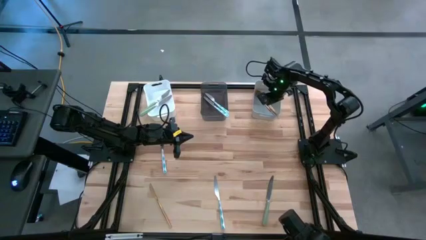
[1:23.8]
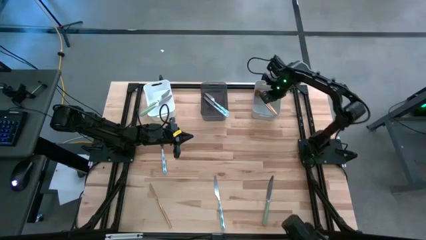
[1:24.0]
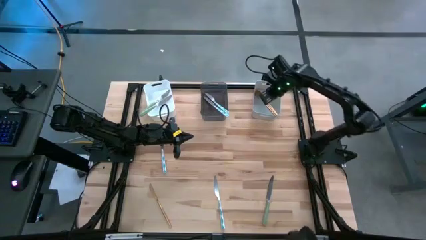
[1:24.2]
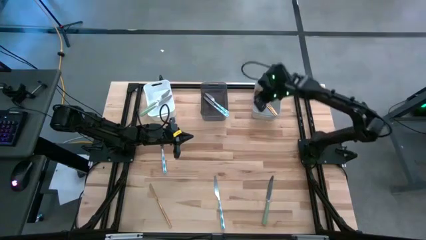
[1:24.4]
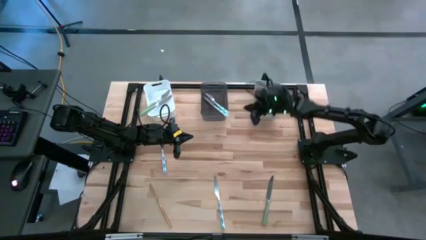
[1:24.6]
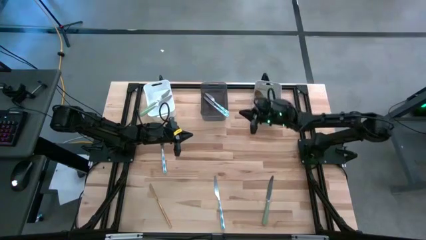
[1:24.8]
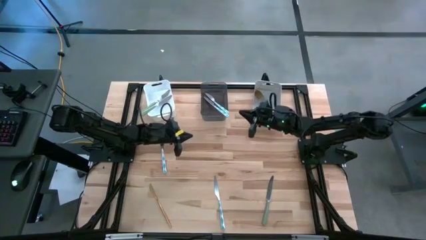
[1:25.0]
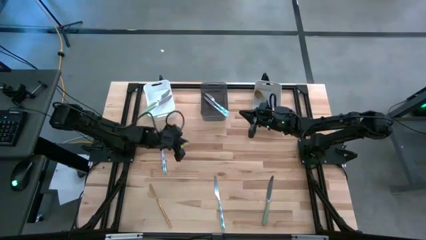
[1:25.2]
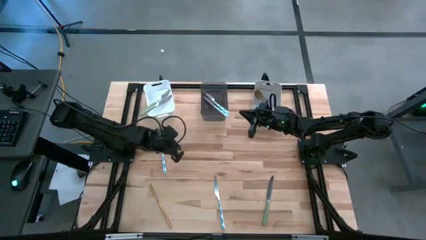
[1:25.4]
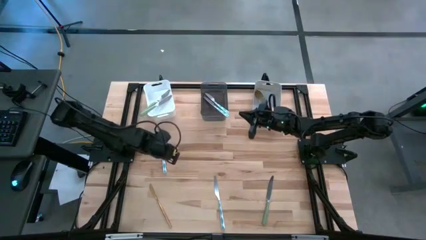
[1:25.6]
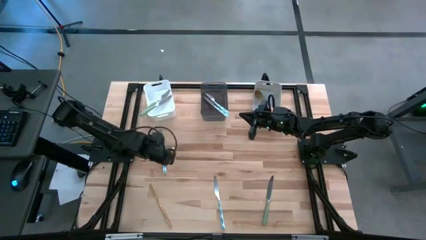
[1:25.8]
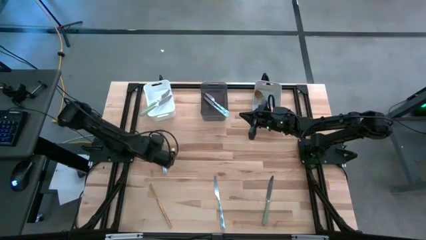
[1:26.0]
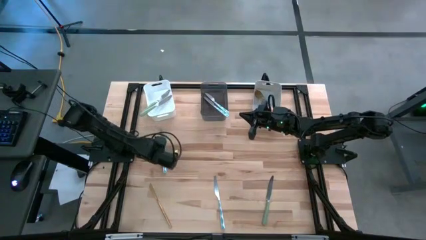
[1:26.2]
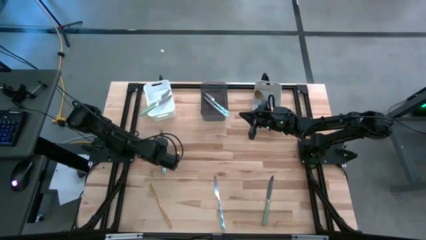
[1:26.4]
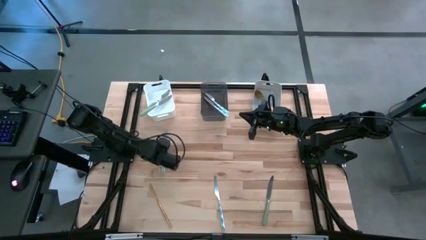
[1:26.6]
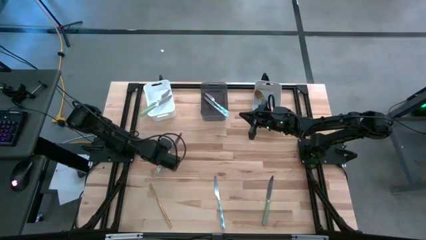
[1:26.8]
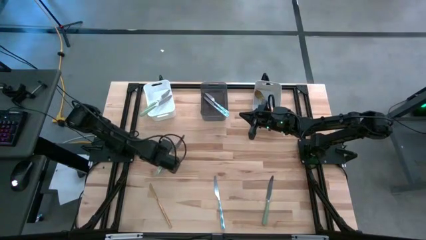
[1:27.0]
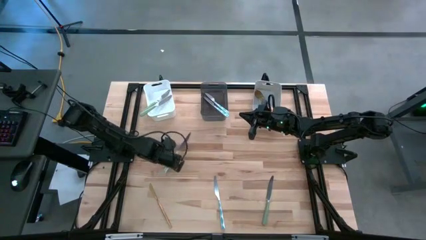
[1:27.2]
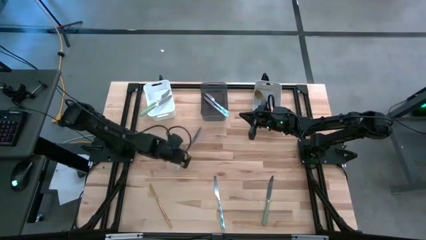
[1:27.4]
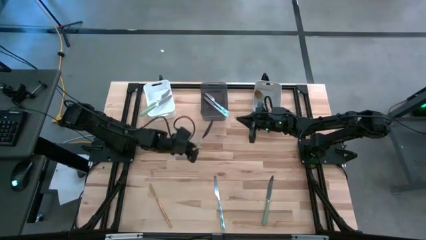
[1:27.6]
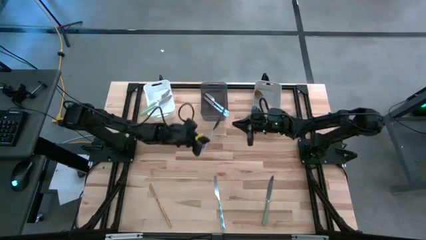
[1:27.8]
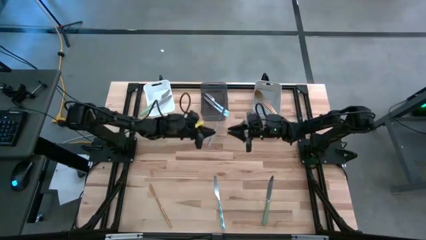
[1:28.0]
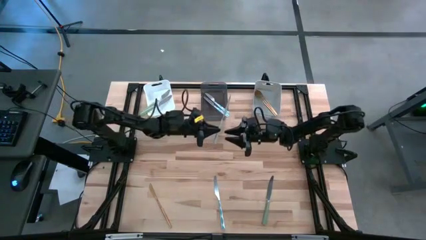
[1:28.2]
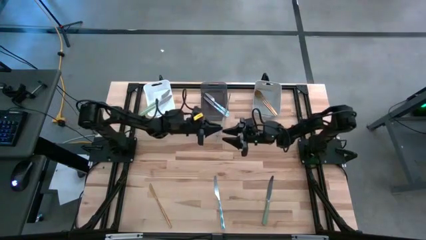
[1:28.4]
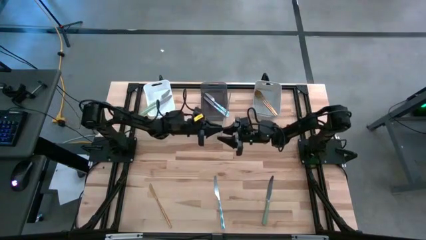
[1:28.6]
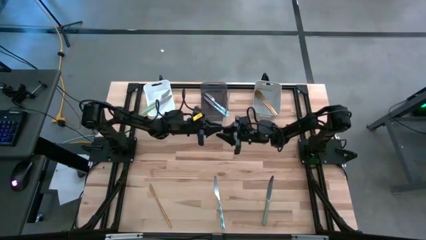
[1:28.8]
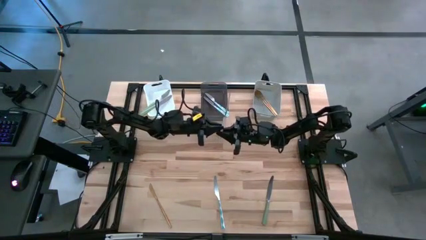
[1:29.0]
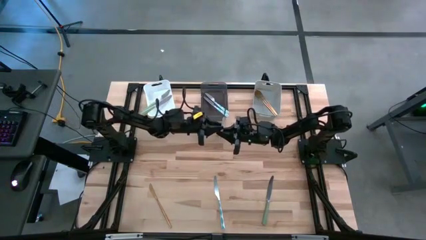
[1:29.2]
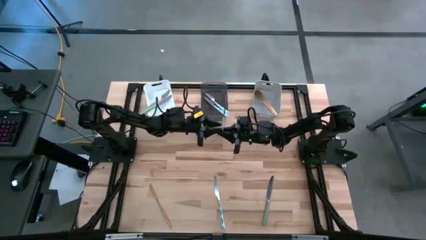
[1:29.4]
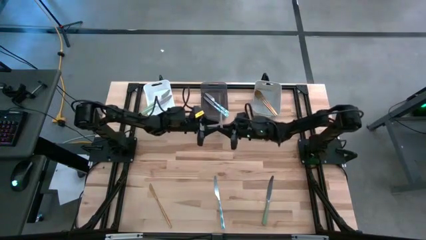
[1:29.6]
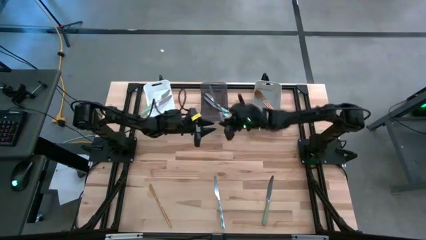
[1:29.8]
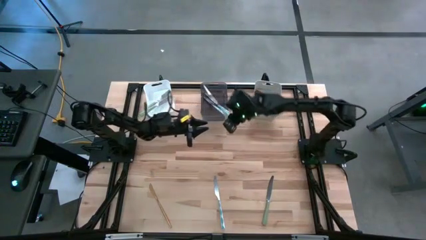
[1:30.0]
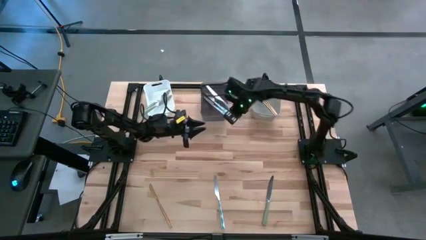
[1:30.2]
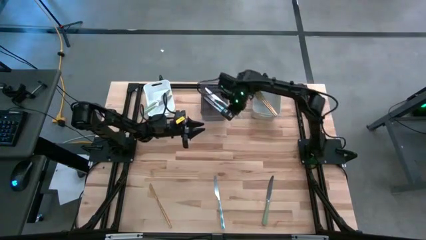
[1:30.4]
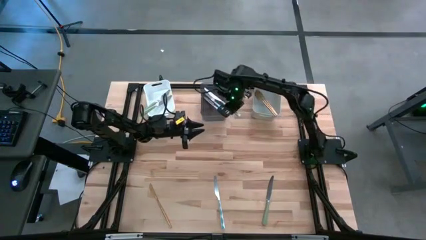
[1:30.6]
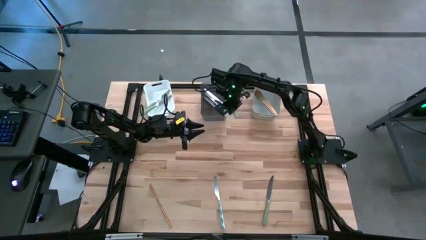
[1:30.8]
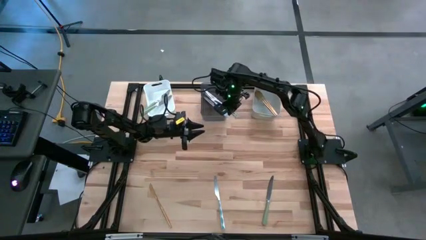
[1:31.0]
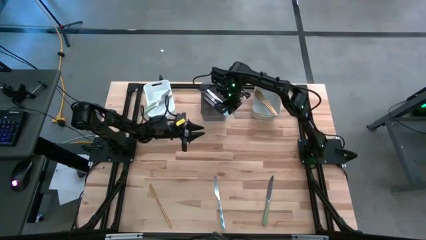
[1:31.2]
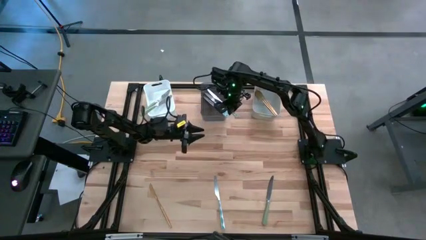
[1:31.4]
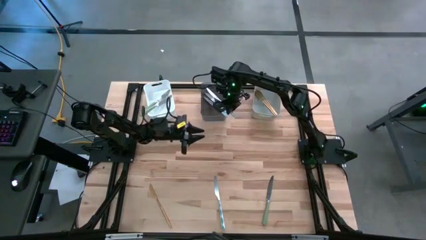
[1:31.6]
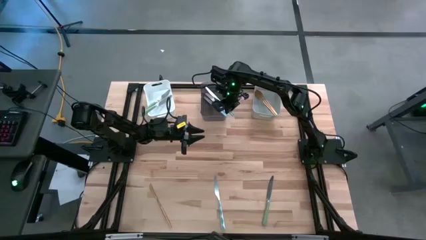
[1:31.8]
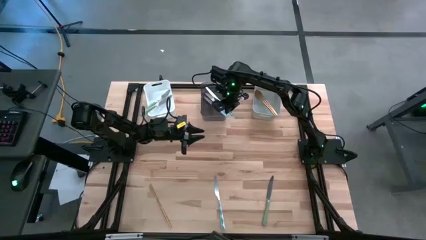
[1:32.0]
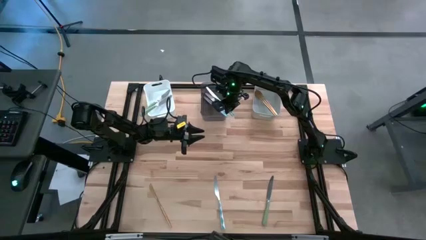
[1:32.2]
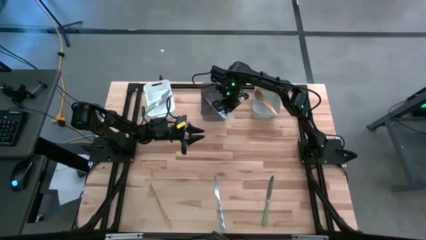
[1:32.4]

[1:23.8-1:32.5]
Task: Sort silverware by color (type)
Put the top blue table knife into the black bin

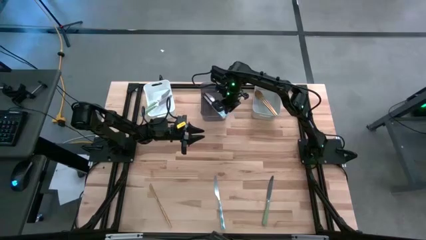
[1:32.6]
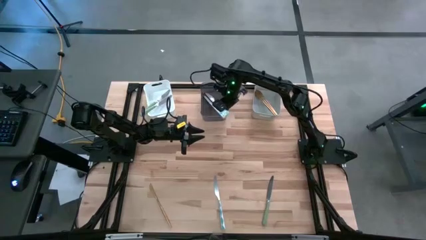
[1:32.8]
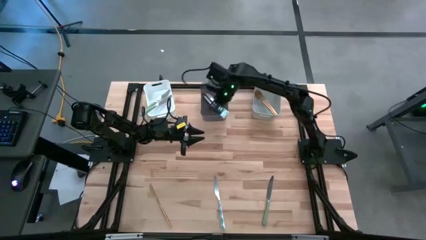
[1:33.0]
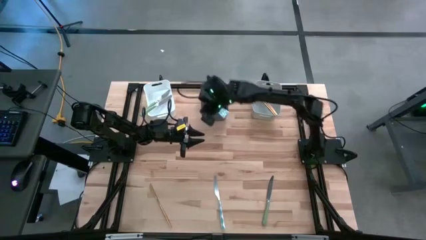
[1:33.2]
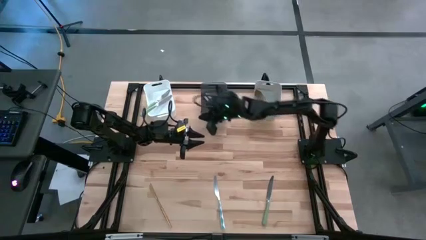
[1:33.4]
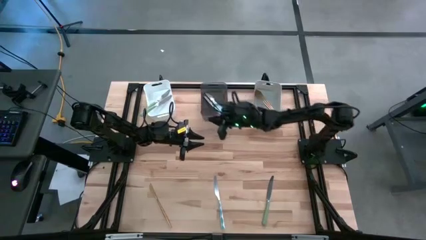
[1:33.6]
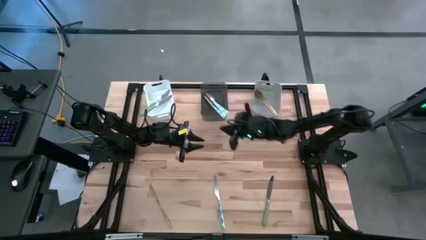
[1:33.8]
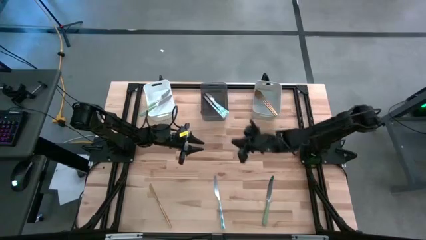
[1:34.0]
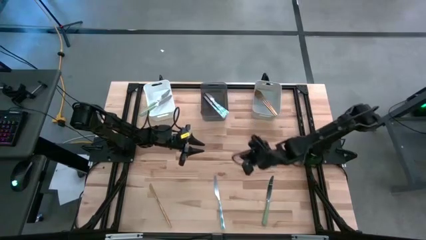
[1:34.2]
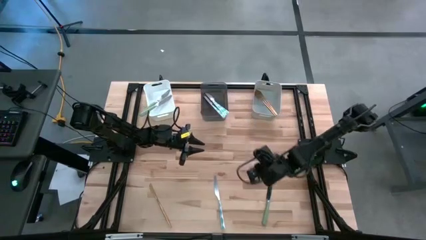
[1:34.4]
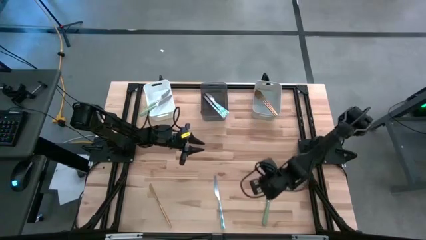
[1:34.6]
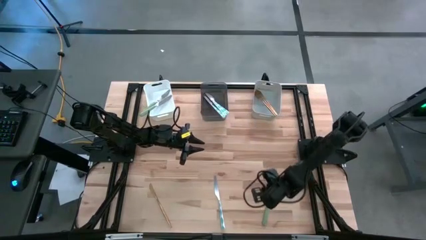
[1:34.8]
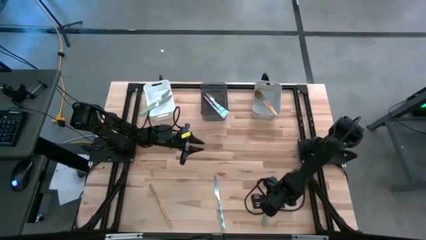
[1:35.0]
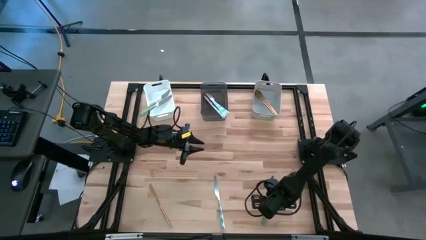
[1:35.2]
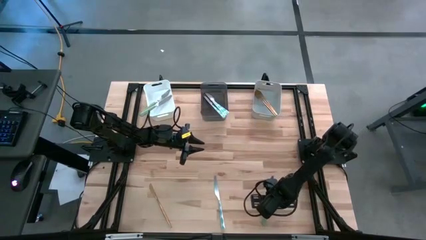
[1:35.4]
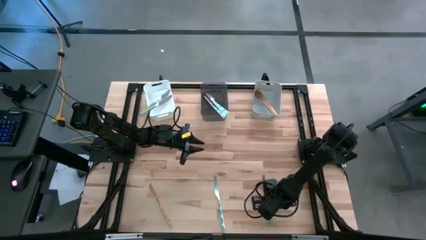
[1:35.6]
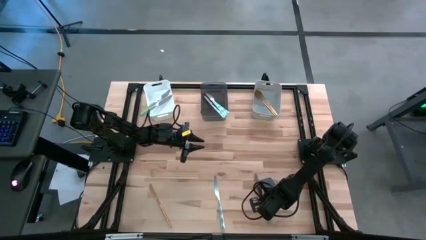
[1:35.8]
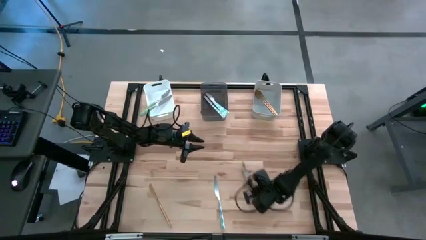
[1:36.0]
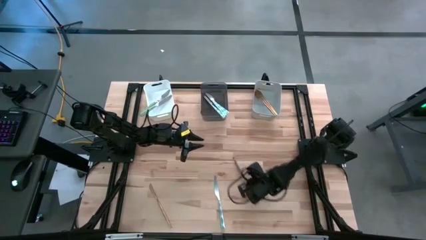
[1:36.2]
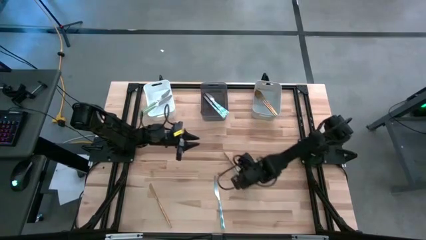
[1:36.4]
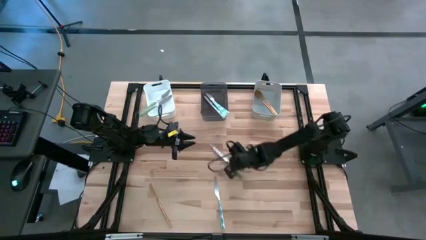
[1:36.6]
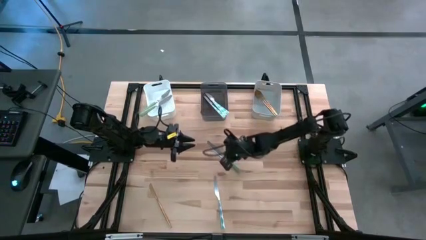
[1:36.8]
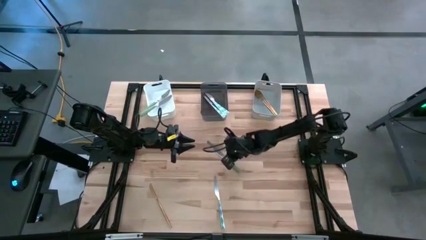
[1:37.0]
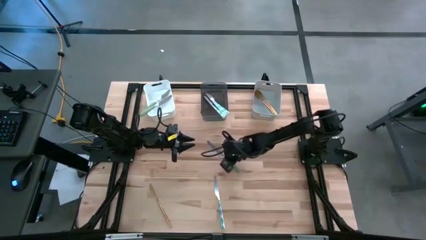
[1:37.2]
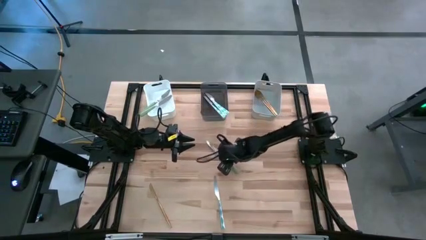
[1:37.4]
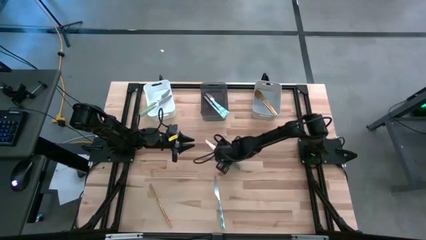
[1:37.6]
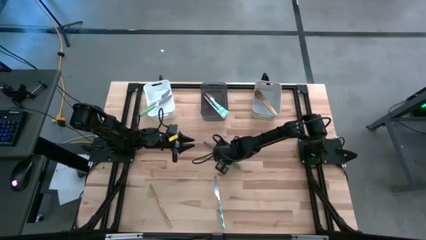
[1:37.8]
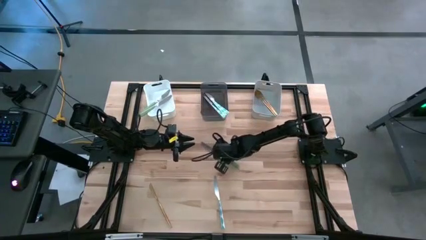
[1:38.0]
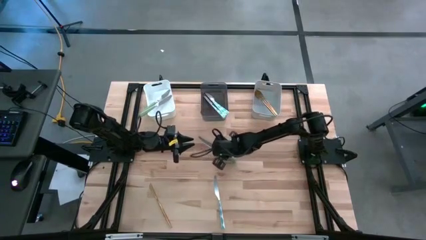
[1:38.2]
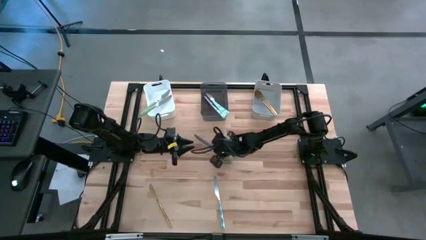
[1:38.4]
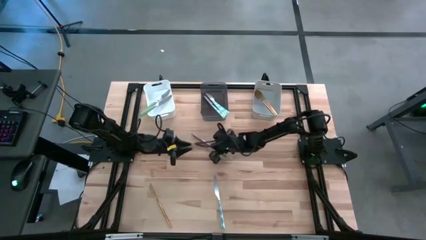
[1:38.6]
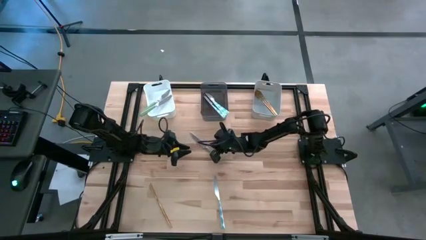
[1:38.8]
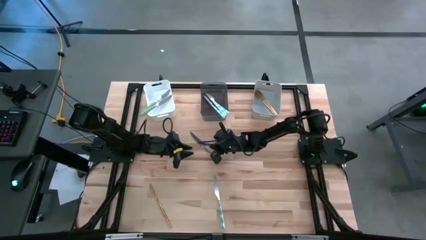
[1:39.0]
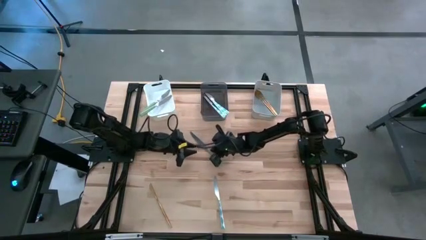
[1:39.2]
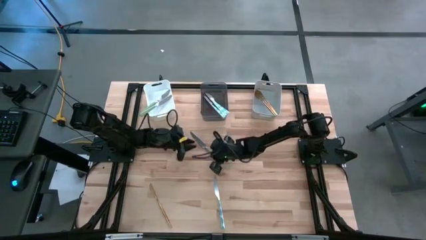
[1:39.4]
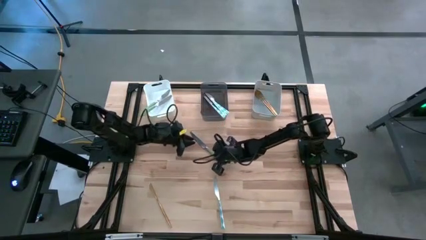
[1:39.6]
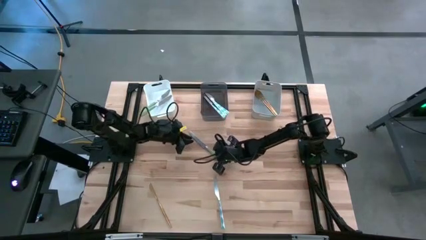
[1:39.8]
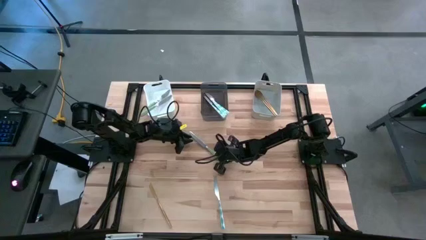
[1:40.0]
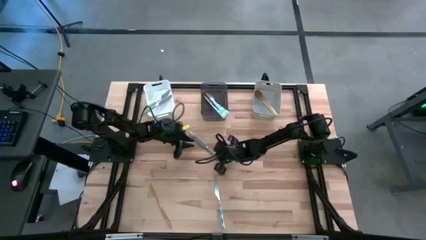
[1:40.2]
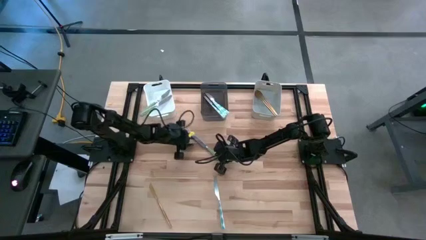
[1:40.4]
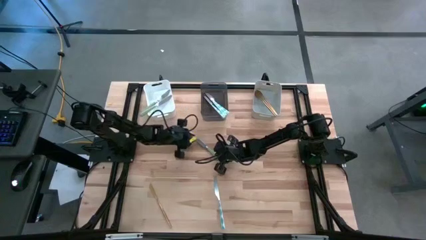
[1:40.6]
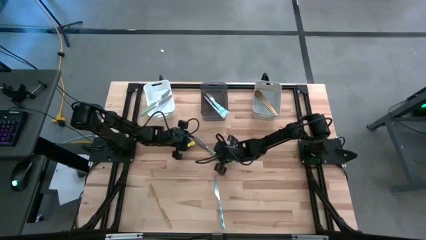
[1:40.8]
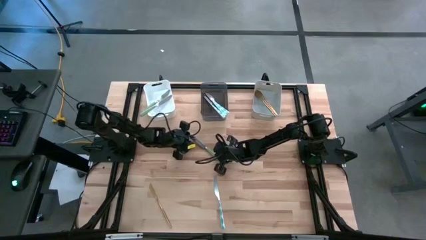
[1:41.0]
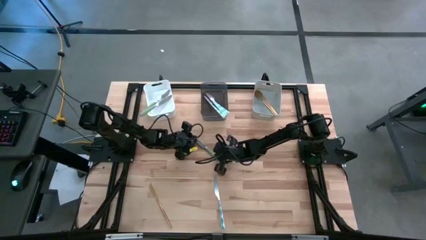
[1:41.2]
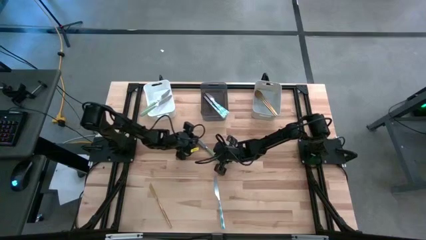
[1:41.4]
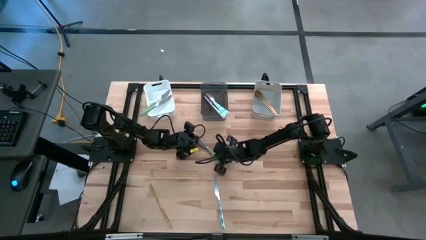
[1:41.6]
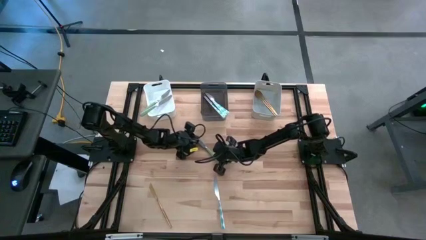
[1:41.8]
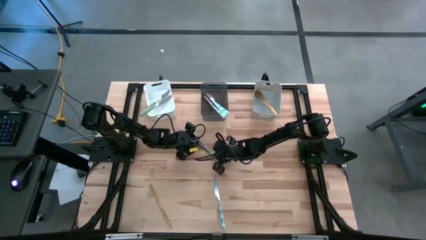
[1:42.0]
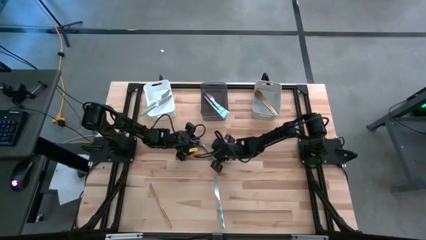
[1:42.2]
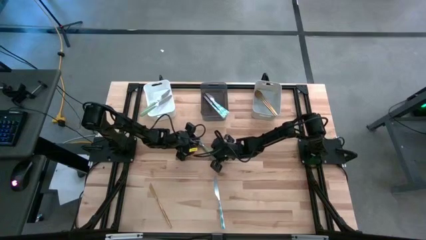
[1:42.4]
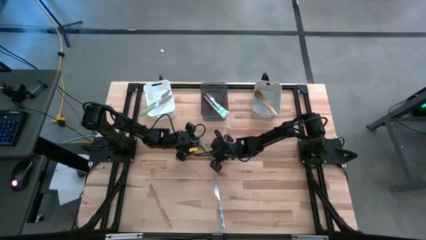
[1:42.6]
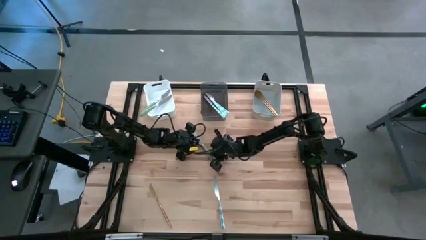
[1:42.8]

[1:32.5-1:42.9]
Put the green table knife into the white bin
